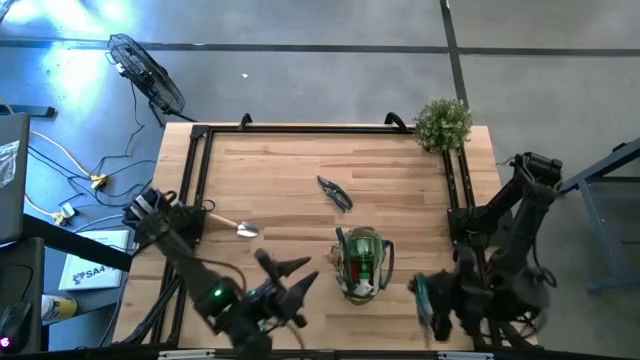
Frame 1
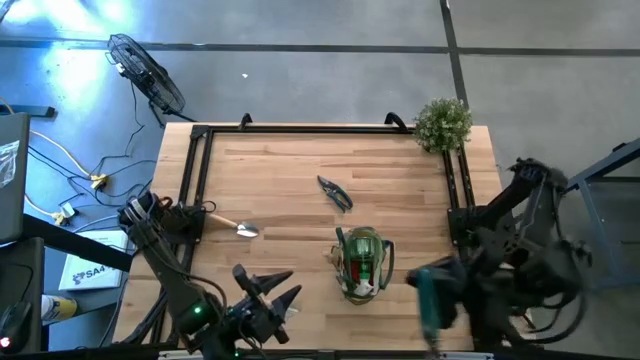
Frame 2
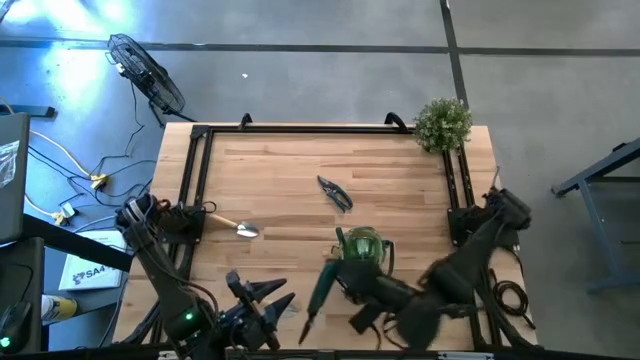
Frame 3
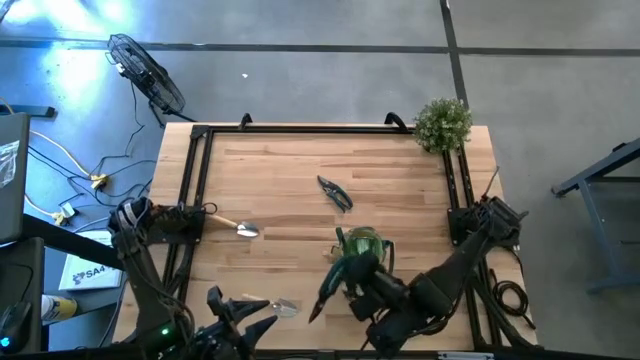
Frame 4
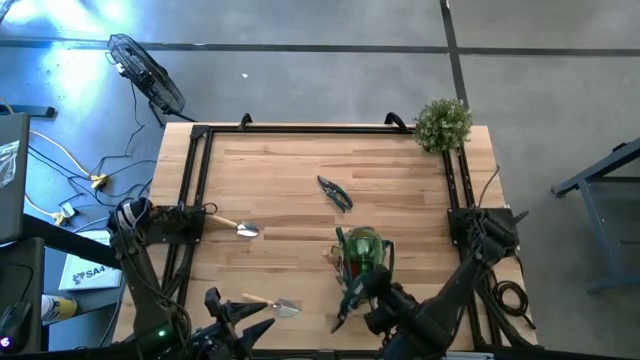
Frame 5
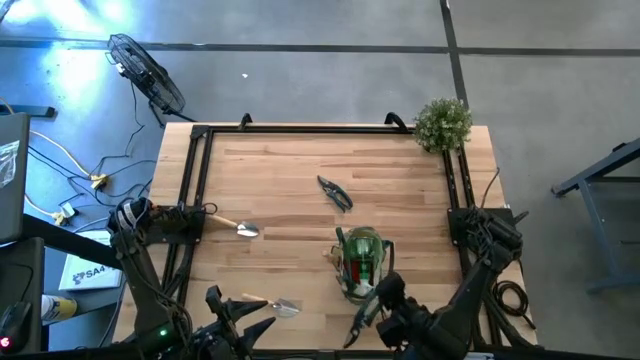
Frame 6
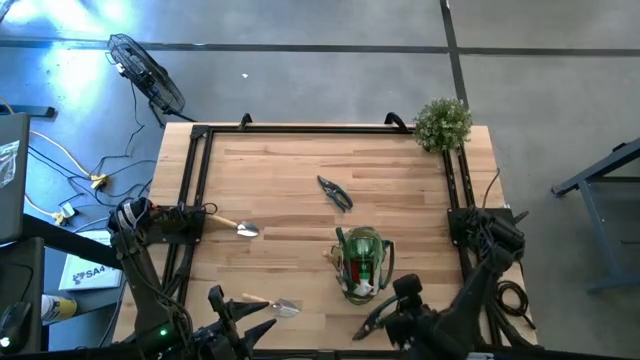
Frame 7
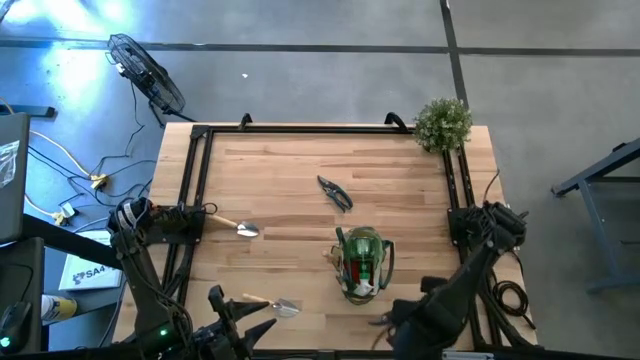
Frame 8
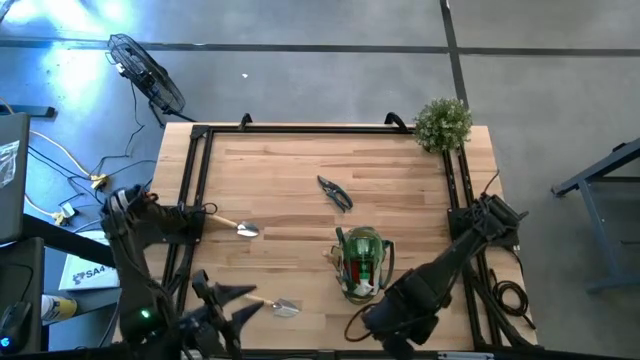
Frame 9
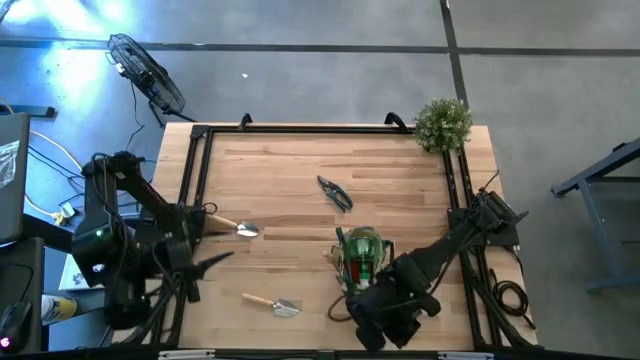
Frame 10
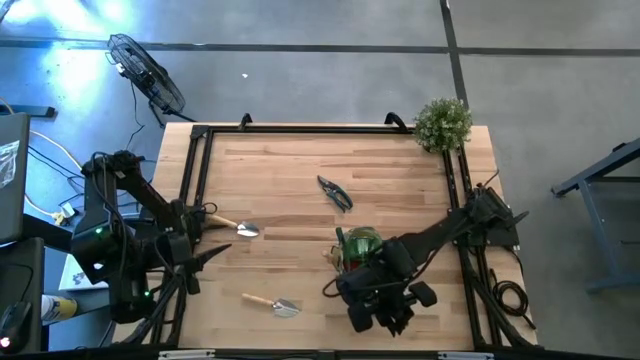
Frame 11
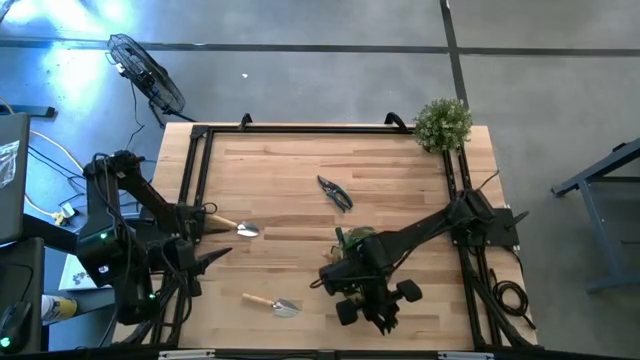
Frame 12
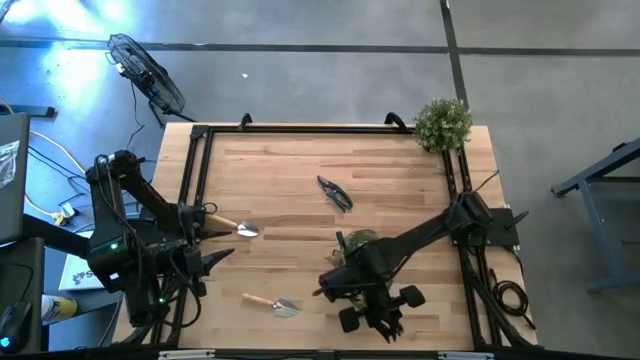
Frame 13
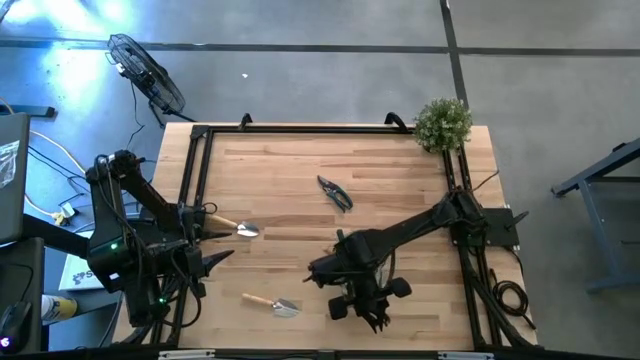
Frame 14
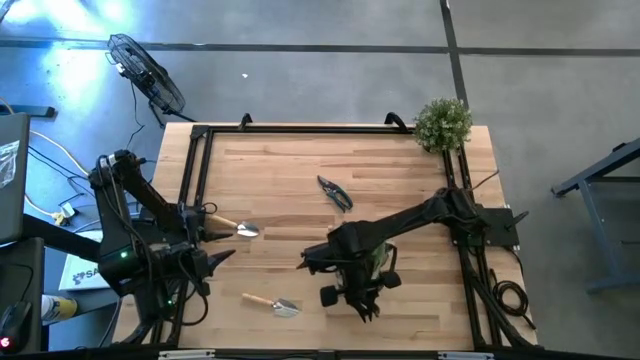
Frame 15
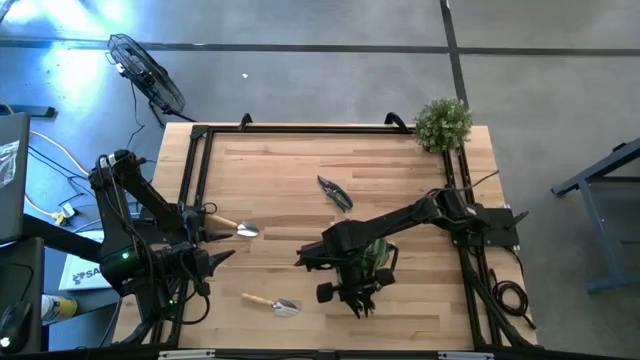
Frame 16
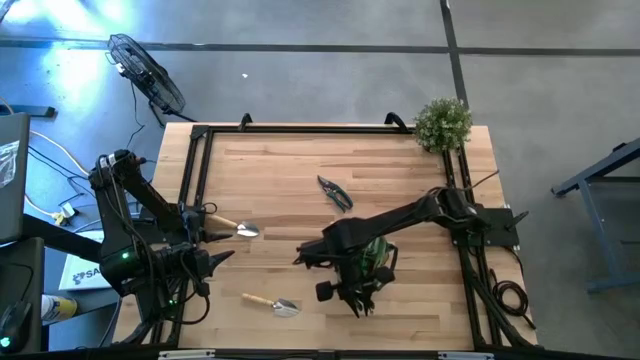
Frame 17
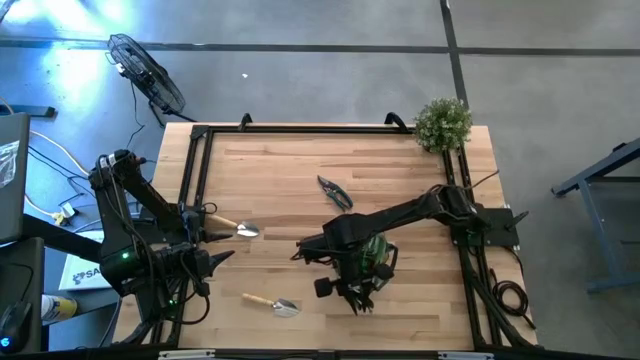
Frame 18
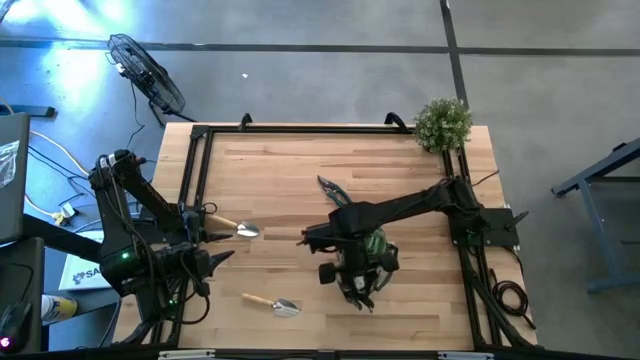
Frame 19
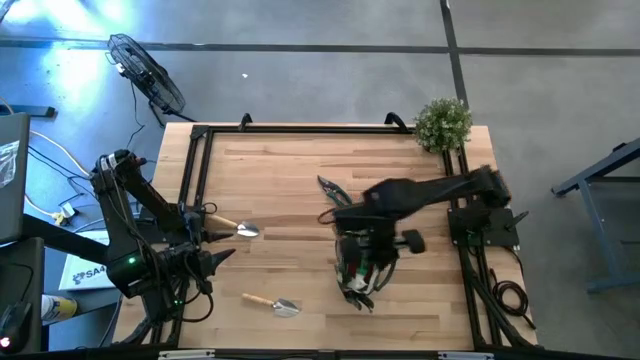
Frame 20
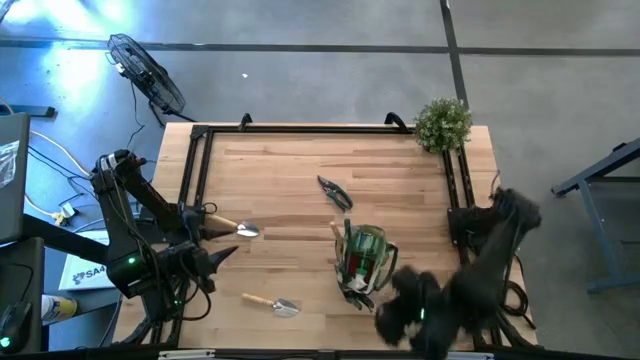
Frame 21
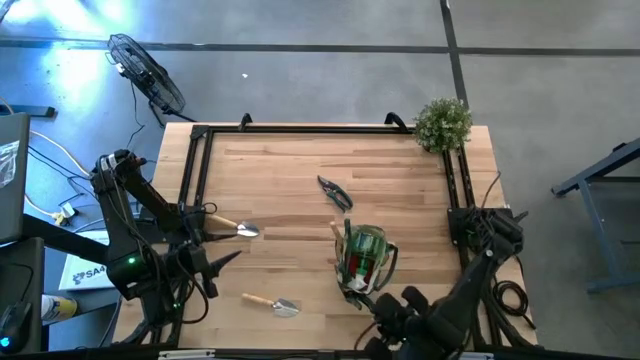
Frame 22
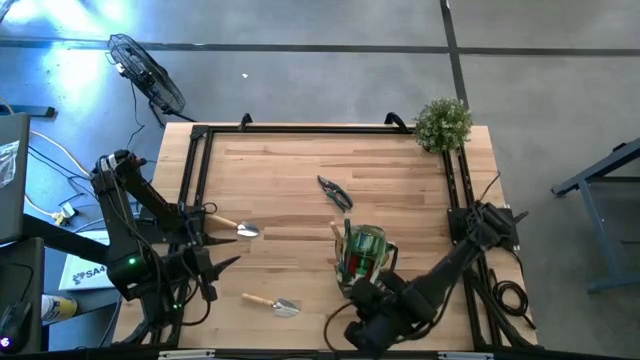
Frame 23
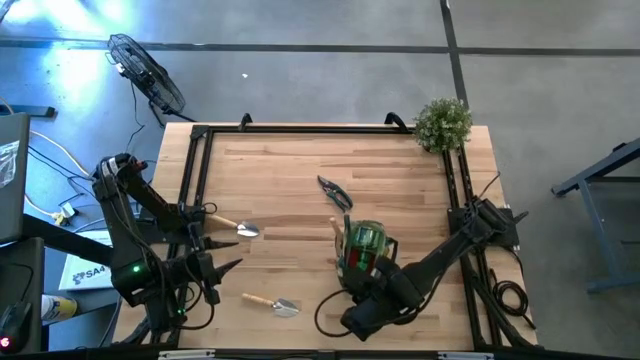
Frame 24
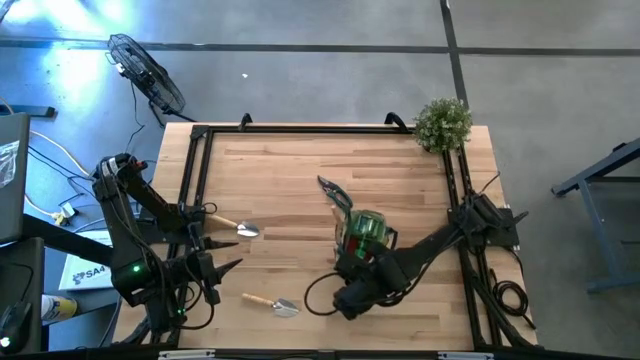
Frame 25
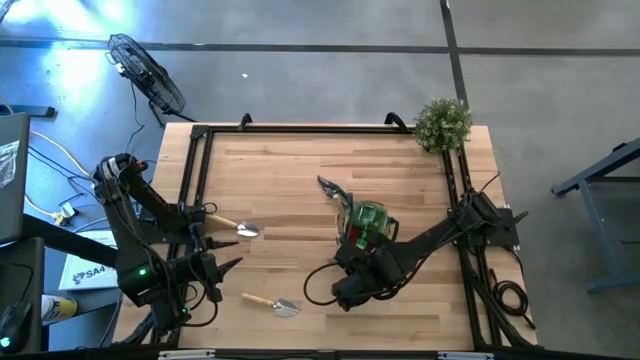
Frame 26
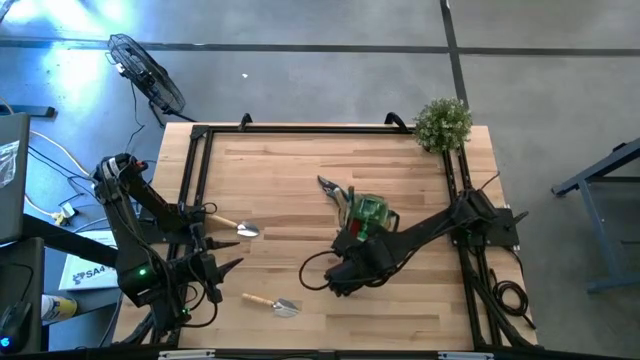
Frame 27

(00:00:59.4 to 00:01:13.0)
Task: Pick & Place Garden tools in Gardening bag
Put the bottom green shear scissors into the gardening bag
